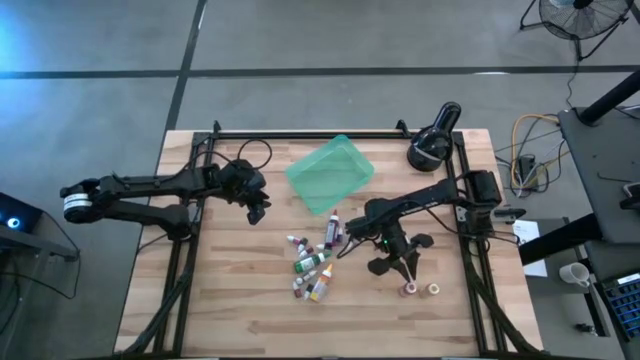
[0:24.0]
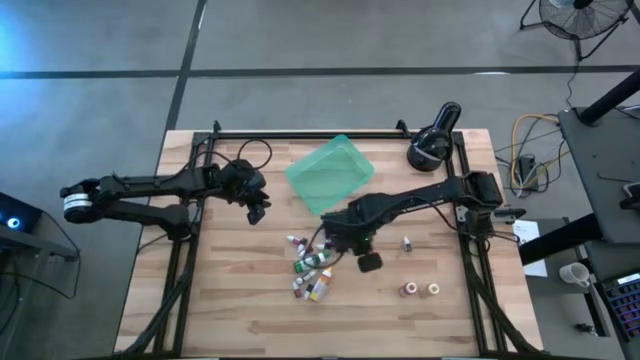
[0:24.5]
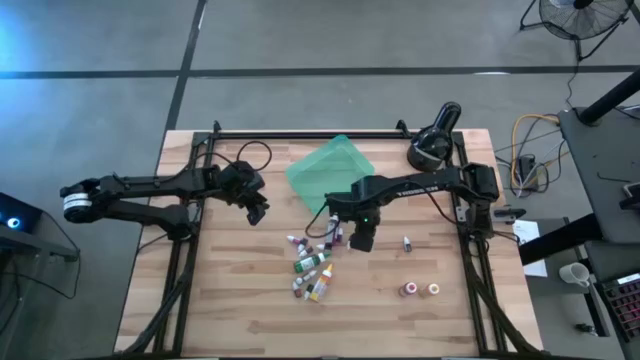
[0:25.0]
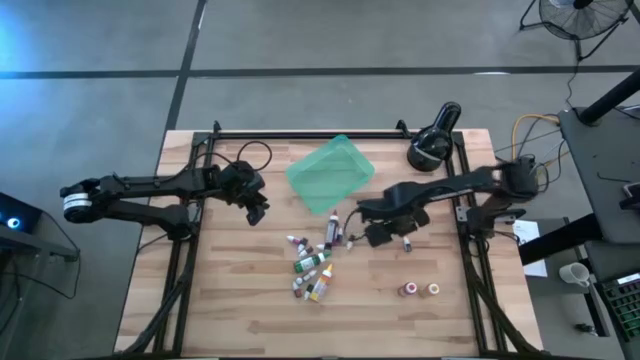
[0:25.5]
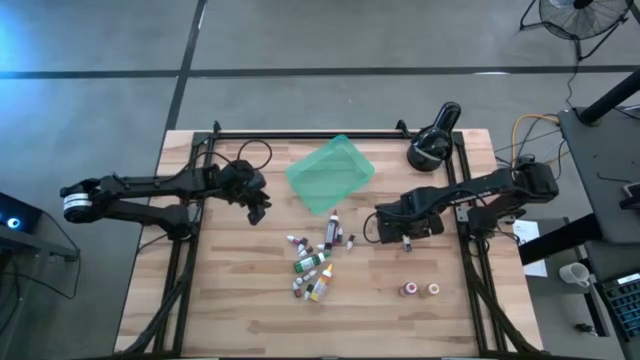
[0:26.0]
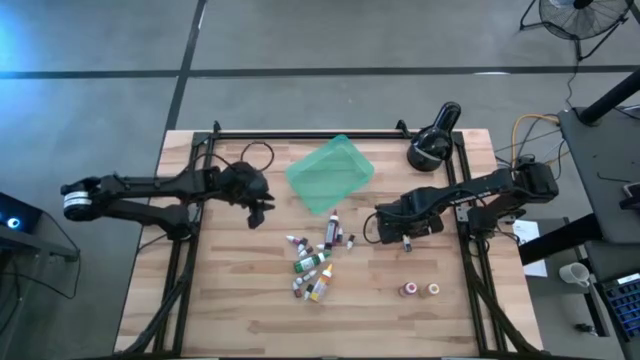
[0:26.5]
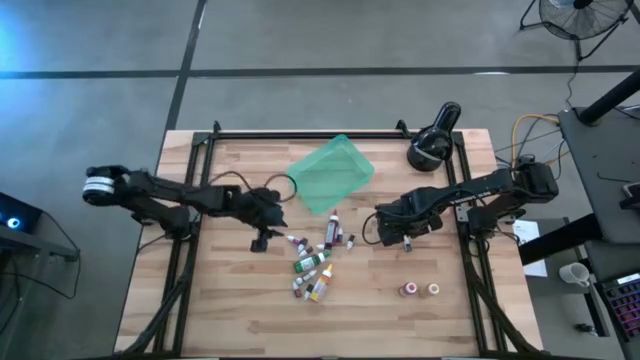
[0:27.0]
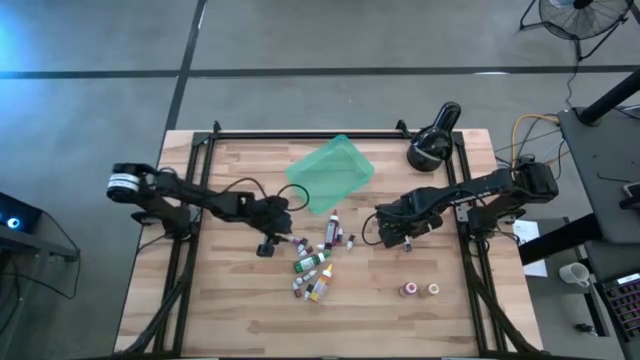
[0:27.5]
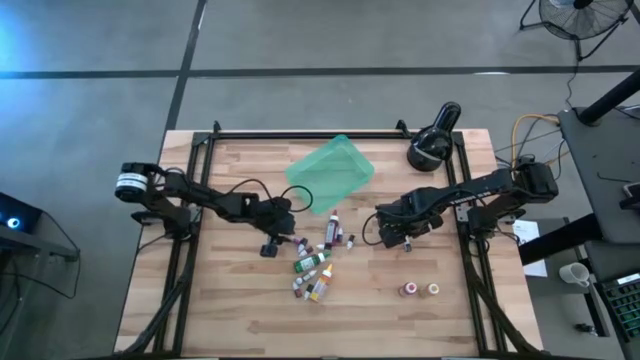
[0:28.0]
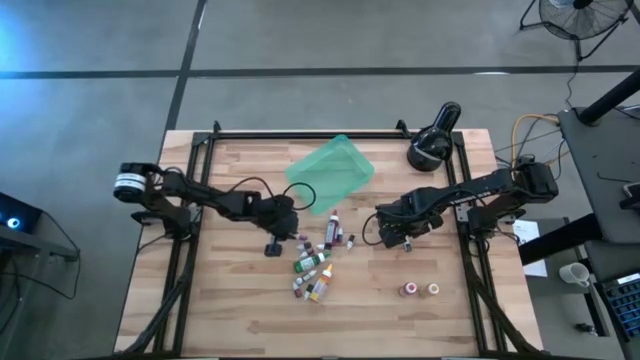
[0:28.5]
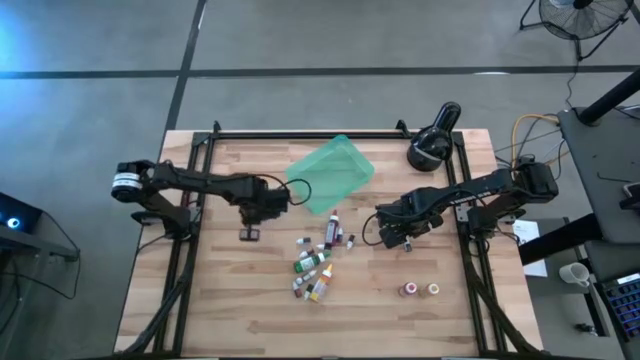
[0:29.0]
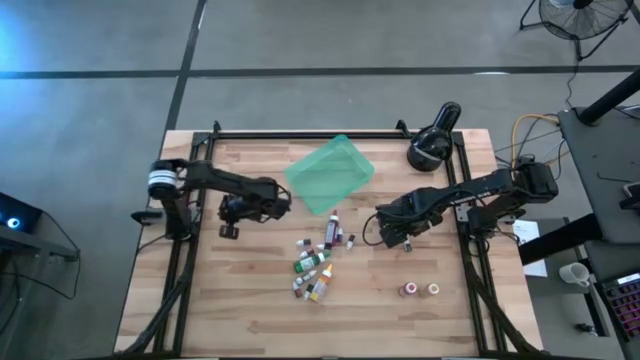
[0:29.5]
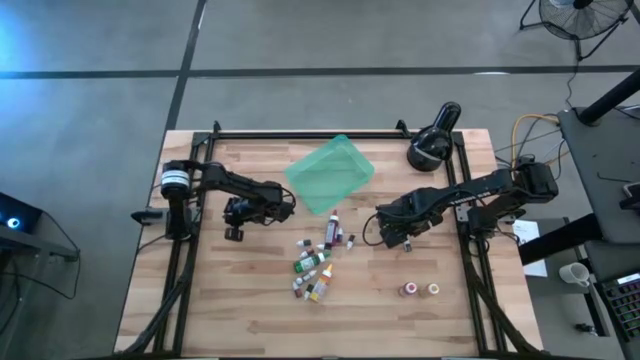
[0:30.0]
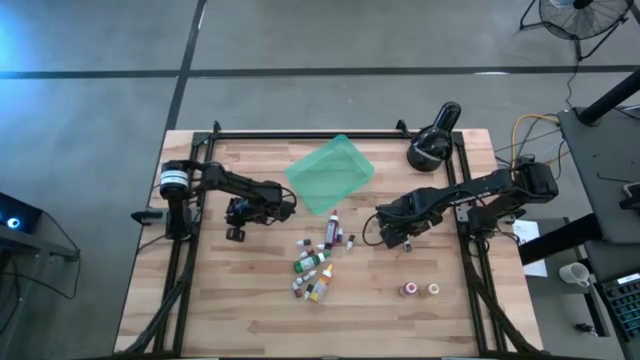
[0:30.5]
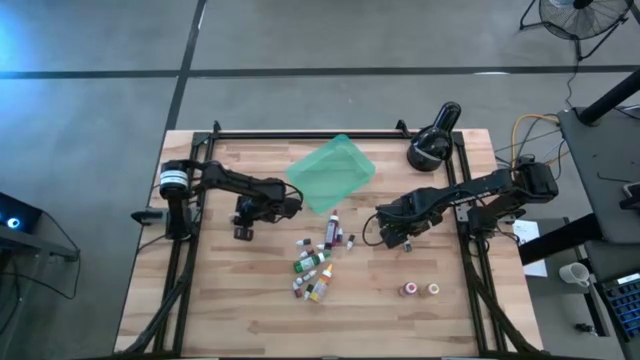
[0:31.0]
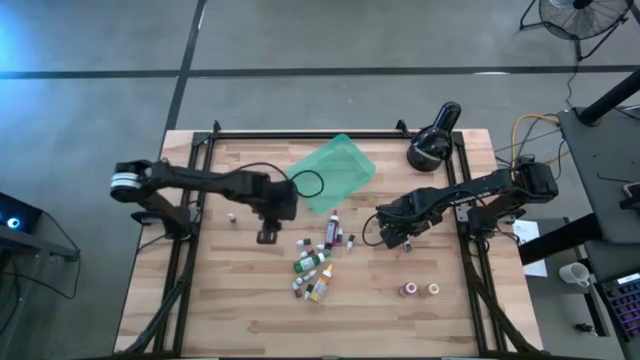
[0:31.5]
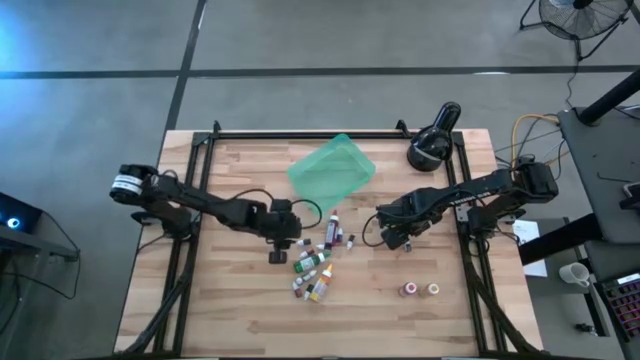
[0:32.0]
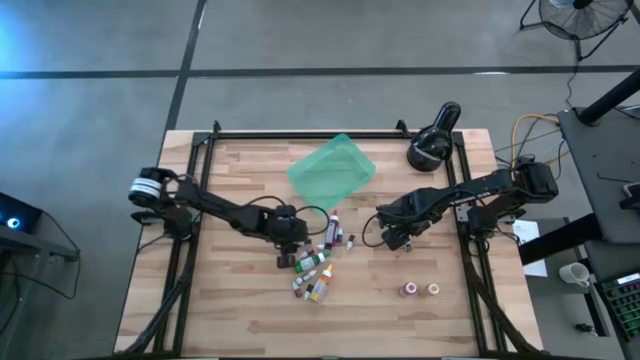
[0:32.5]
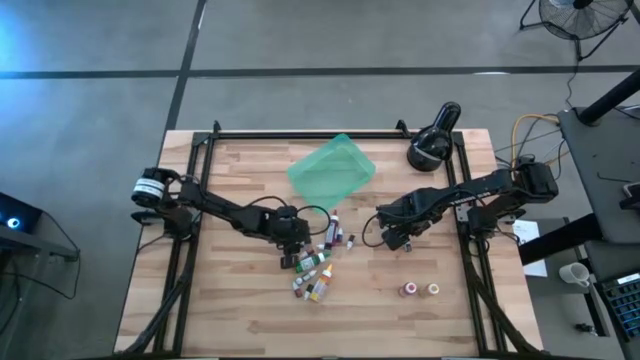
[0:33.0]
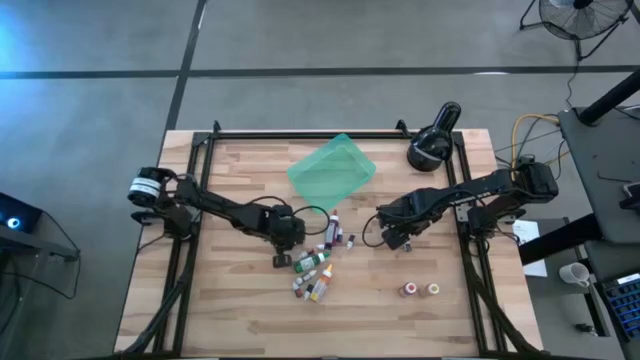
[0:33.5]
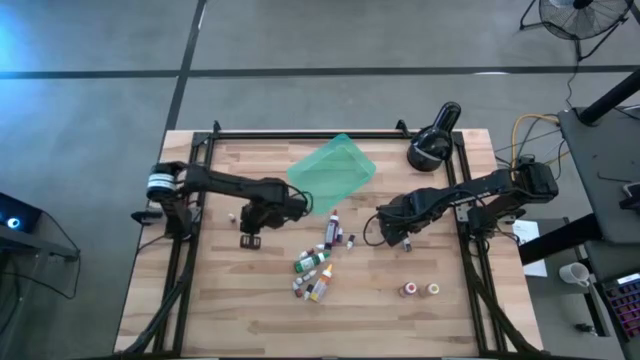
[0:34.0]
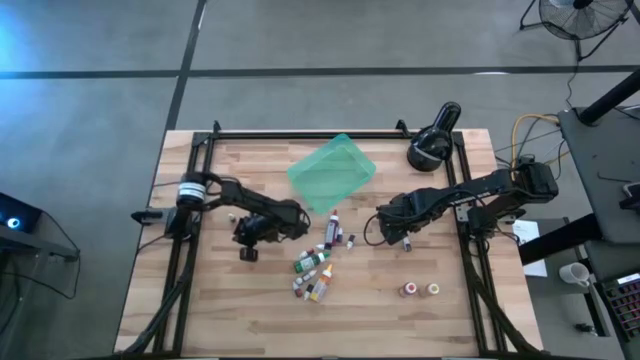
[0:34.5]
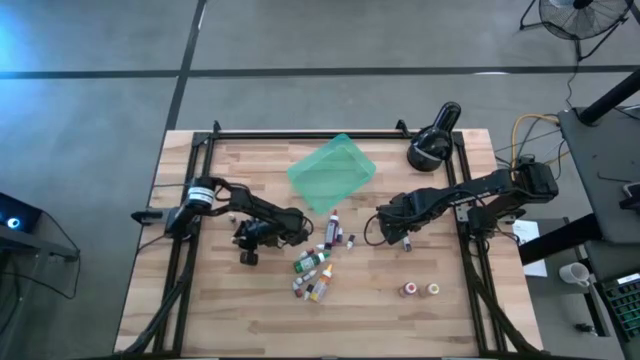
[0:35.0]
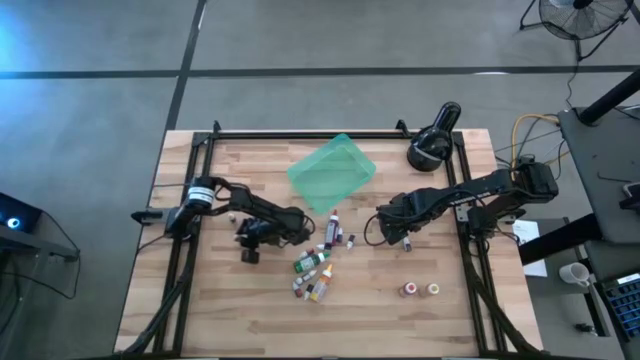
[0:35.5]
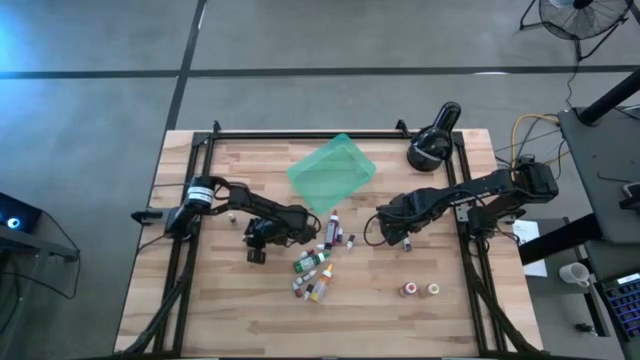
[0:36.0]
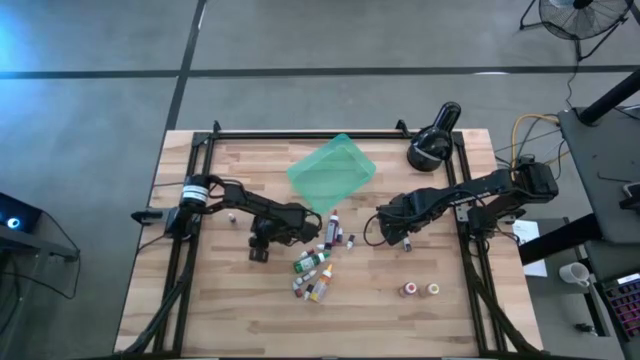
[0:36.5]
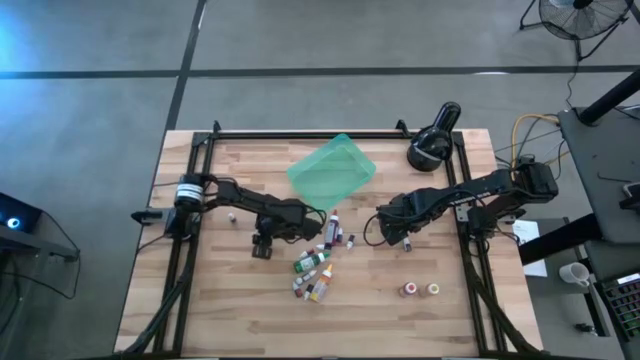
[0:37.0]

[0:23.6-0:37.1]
Task: Pick & Place food coloring
Adjust the pink small food coloring bottle

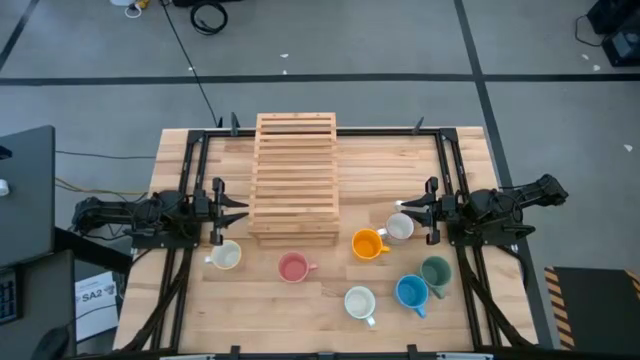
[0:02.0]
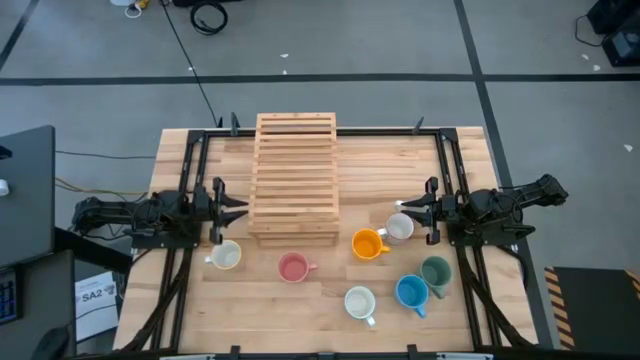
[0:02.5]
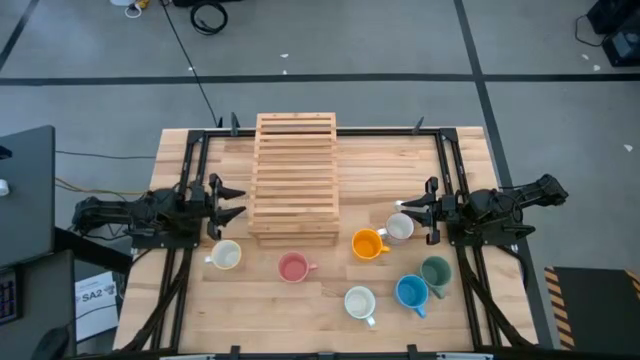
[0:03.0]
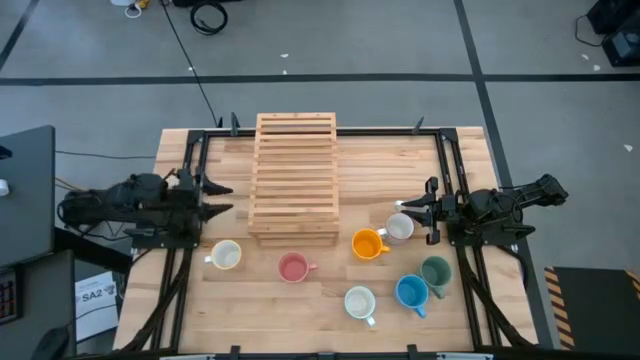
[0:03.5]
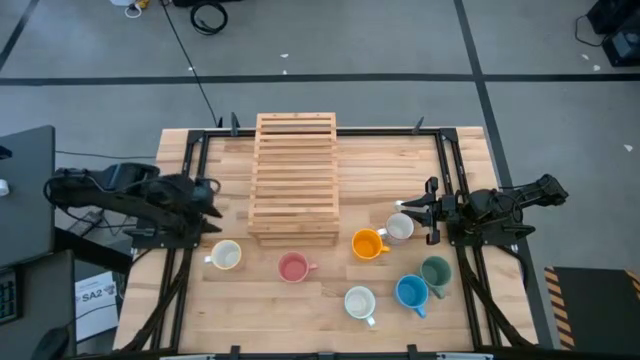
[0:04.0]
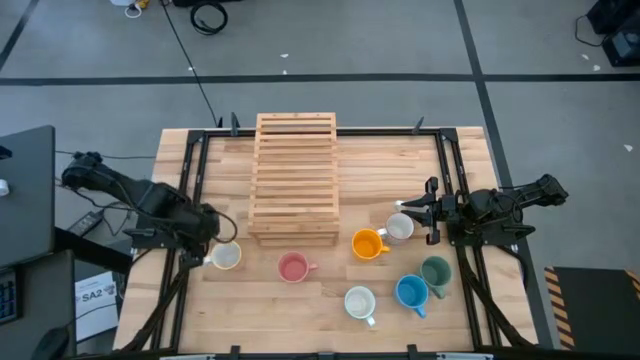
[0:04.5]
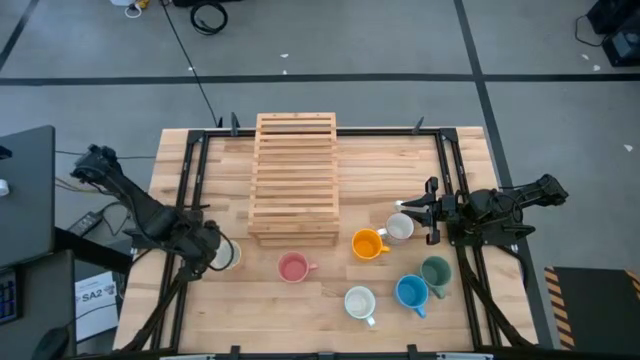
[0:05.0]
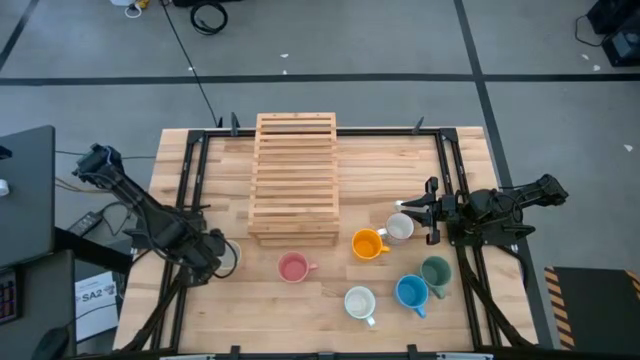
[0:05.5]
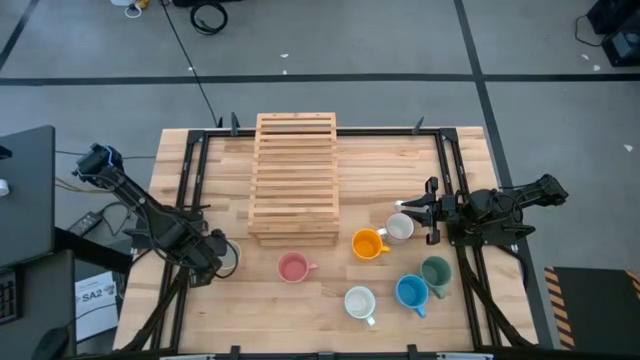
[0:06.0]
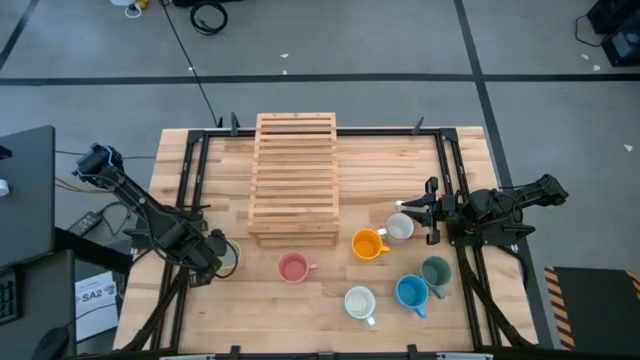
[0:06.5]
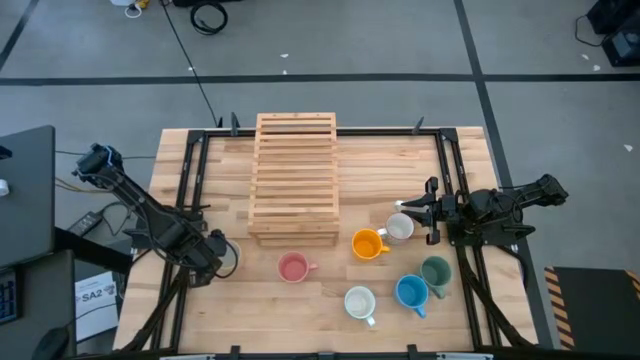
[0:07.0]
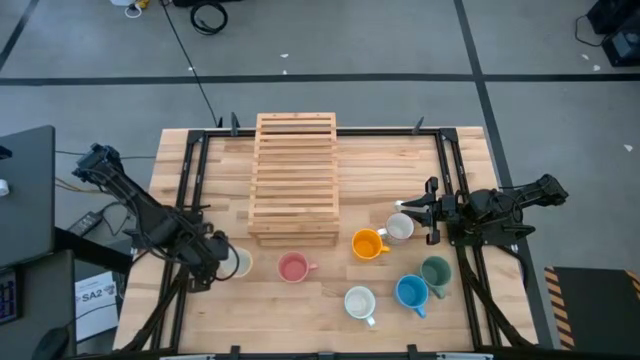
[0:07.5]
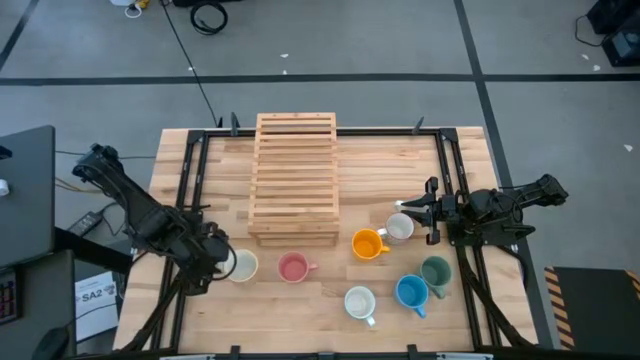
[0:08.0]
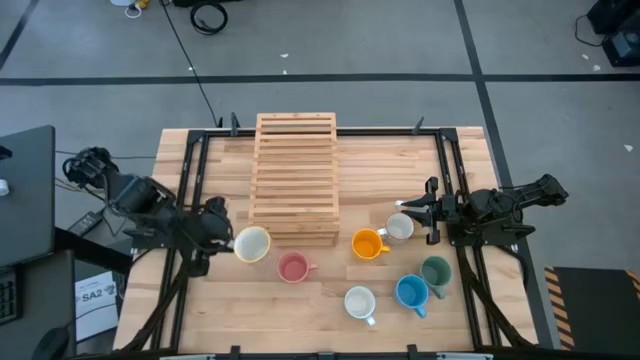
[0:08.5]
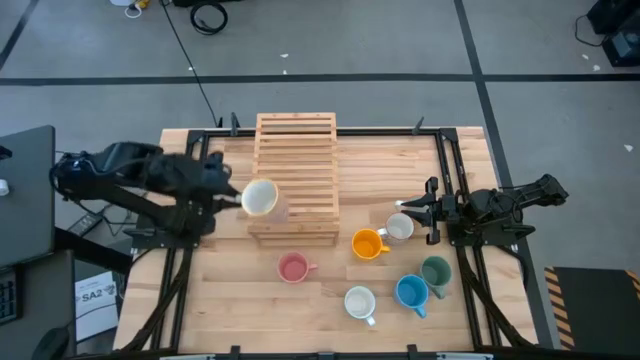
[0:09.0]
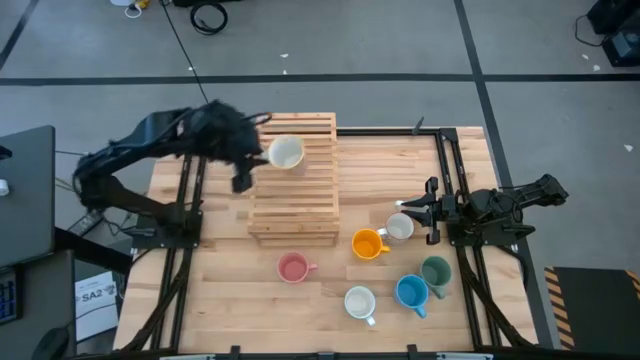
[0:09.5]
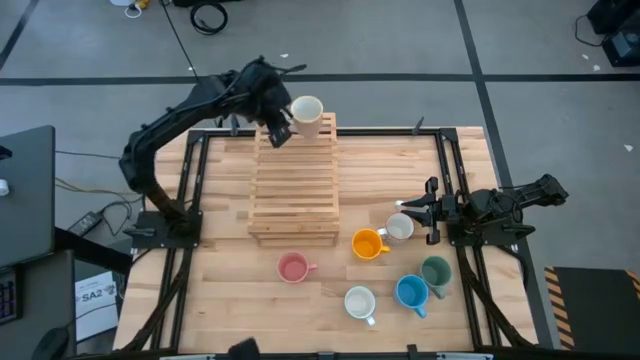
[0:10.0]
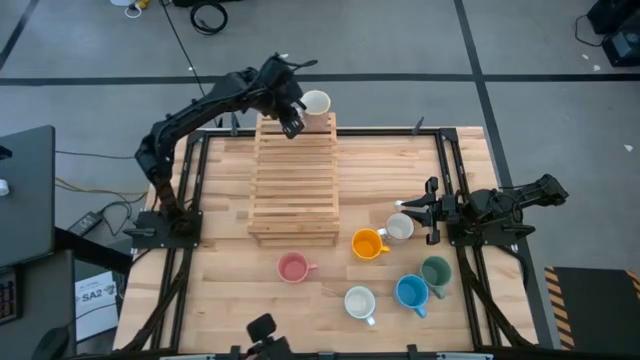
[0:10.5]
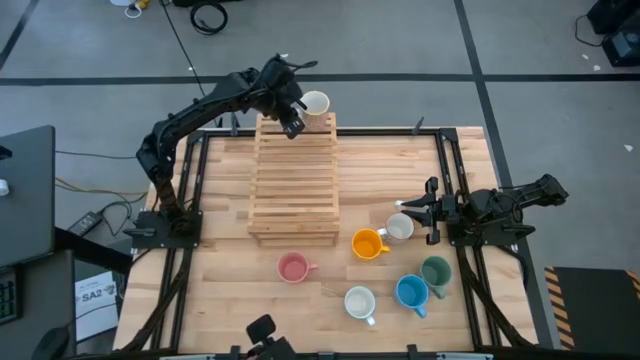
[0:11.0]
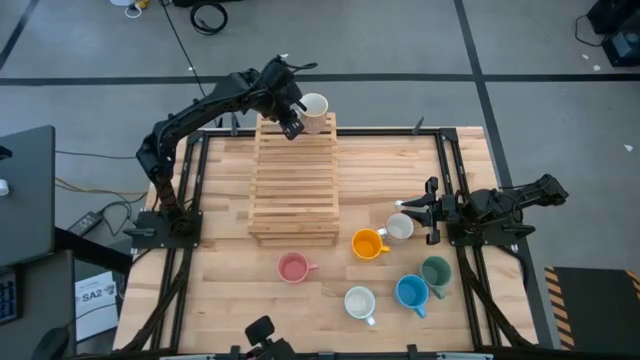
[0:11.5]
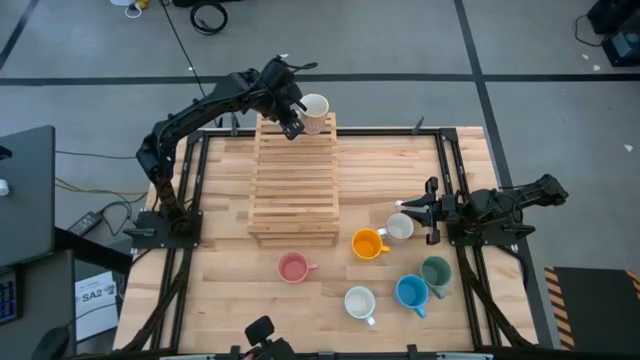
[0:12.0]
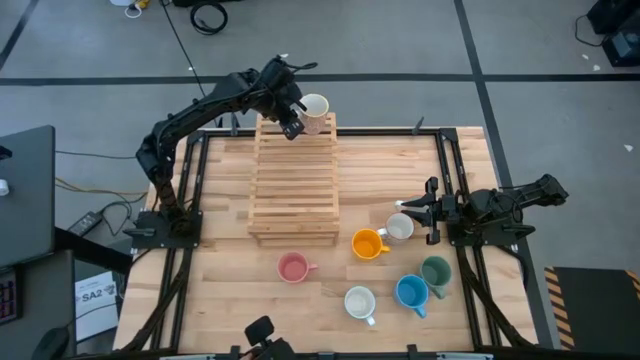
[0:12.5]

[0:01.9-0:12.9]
Task: Place coffee mugs
Put the light yellow mug on the shelf
